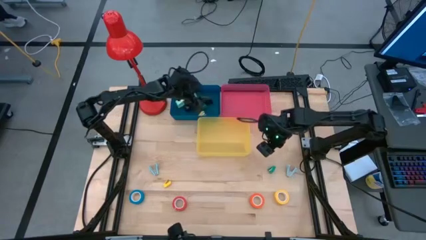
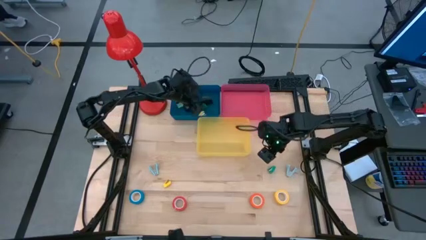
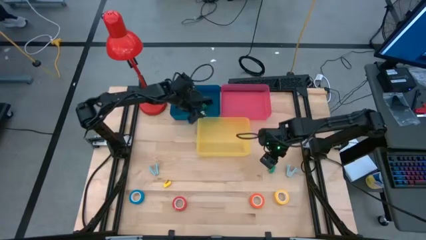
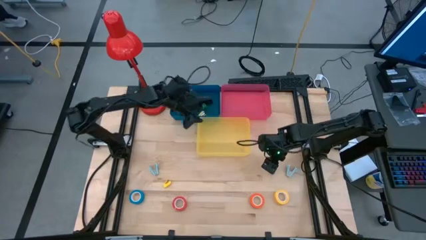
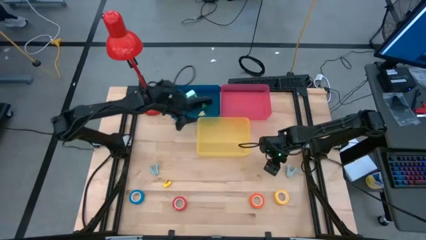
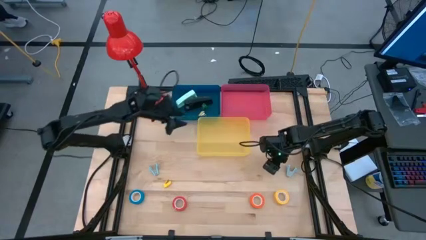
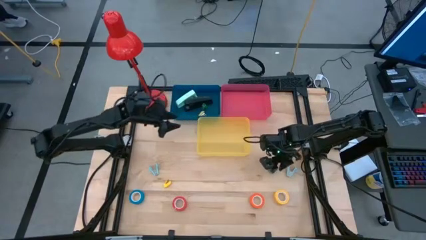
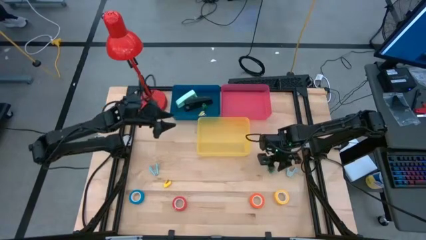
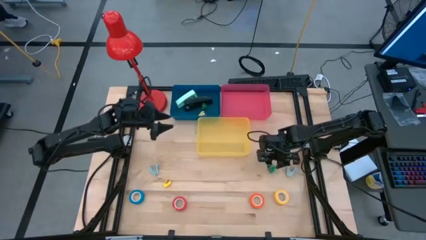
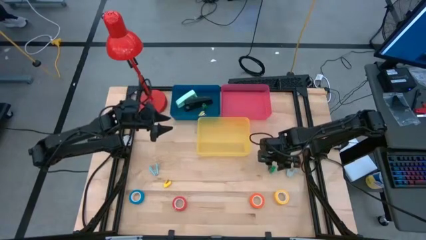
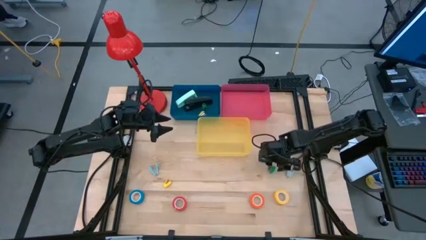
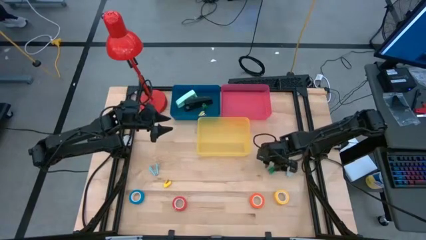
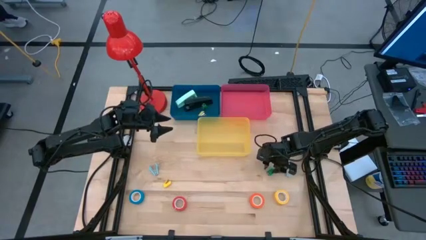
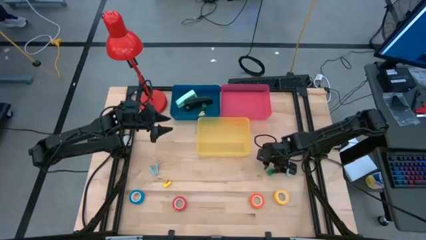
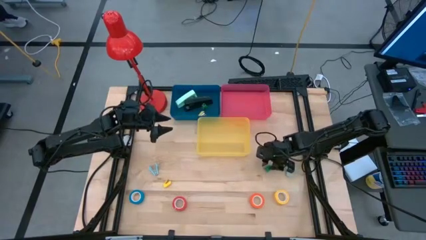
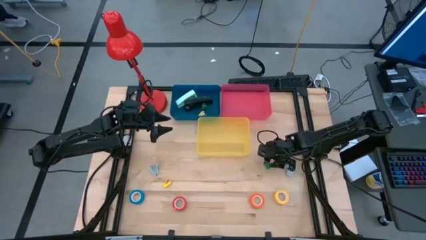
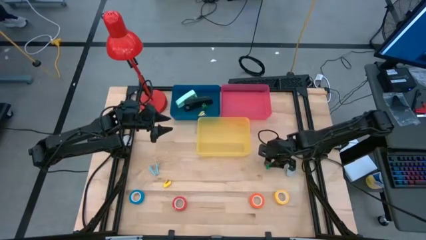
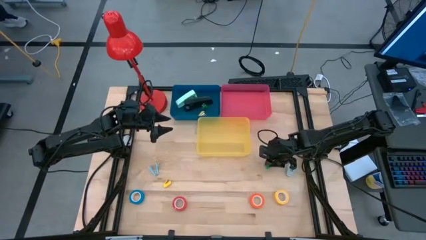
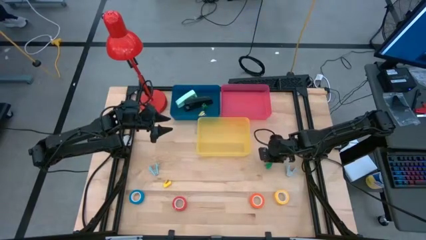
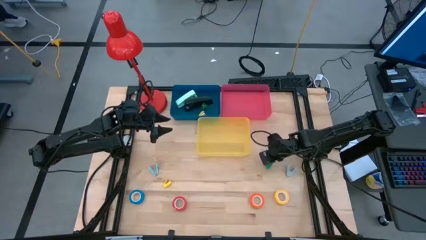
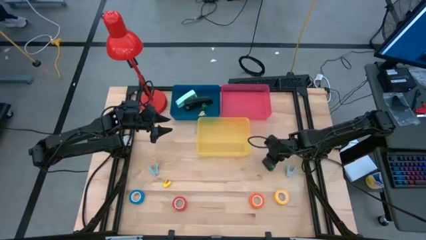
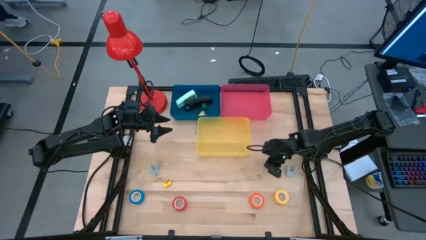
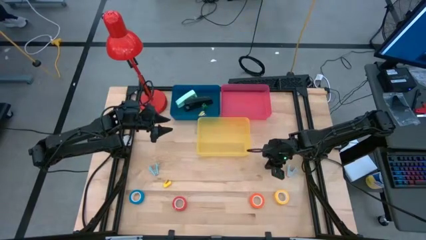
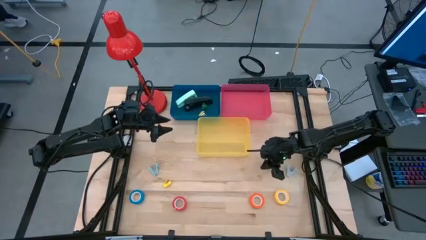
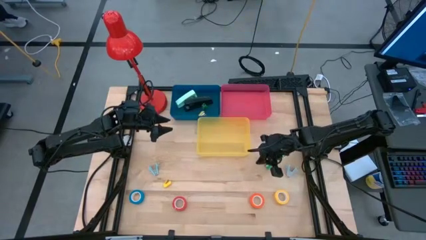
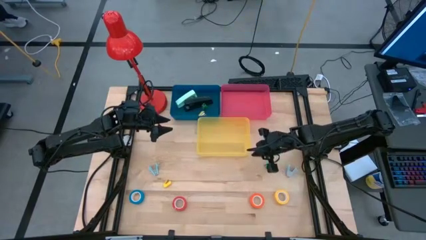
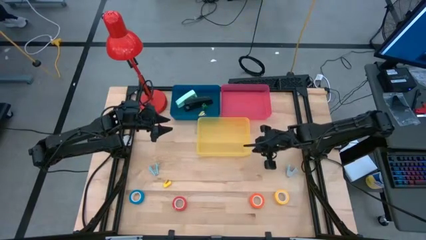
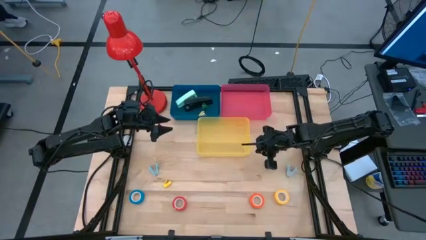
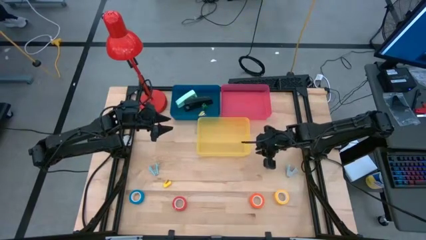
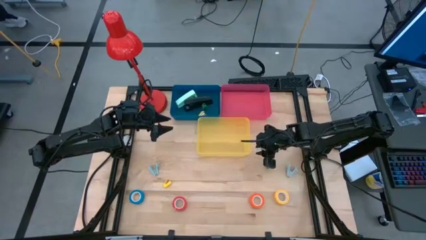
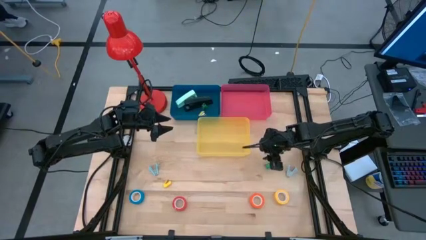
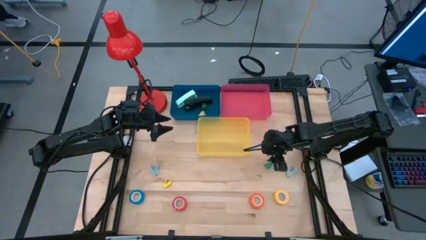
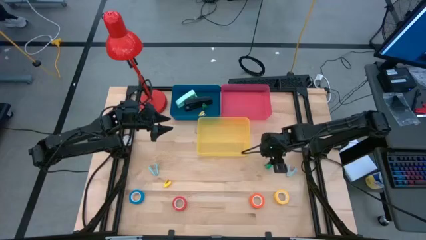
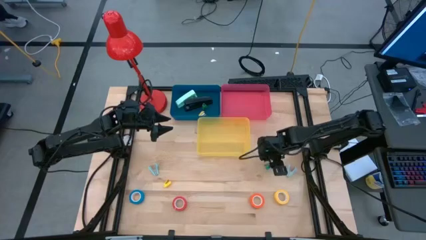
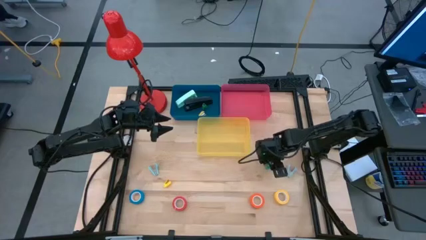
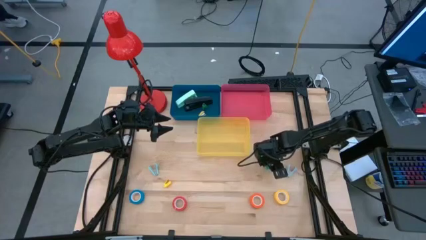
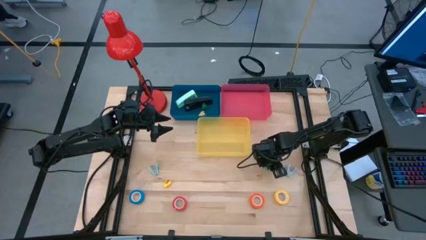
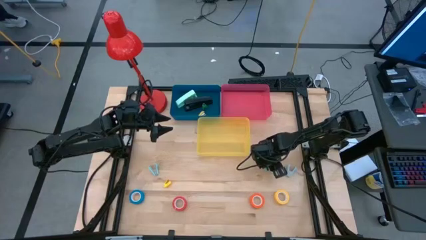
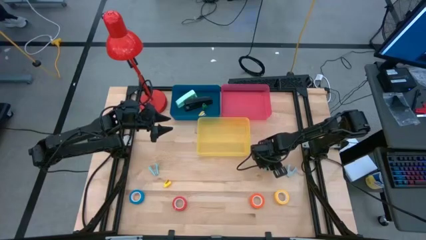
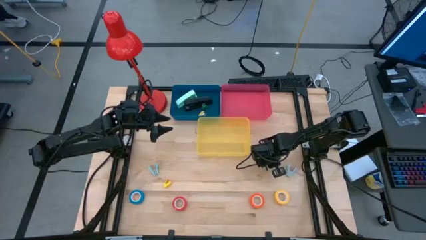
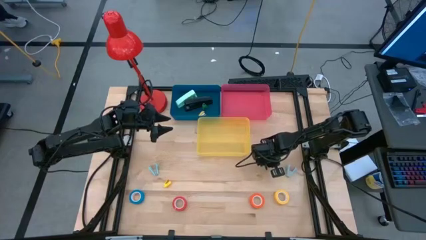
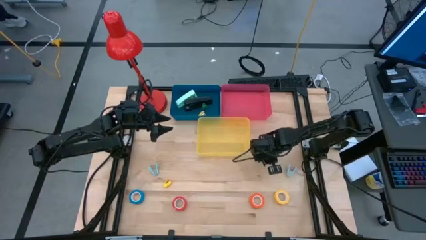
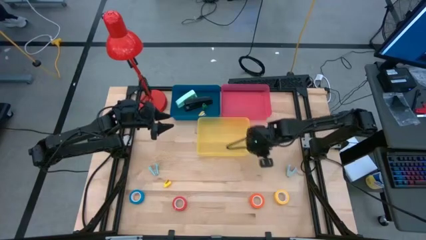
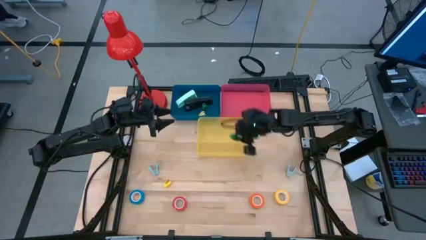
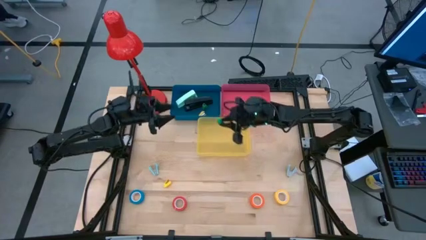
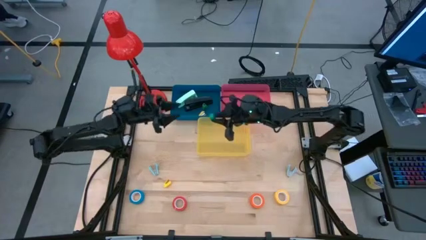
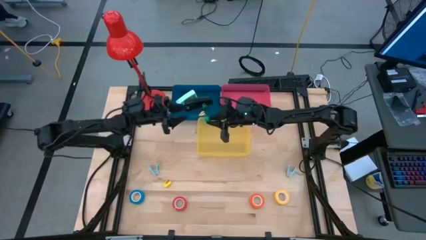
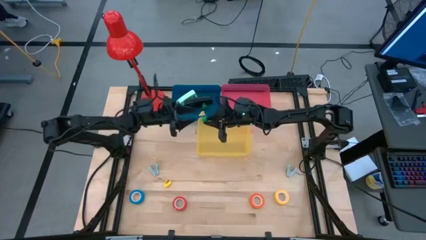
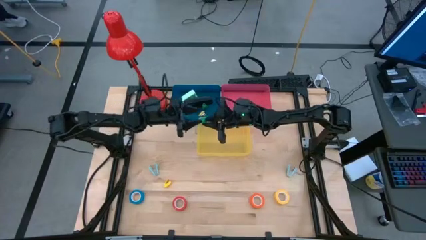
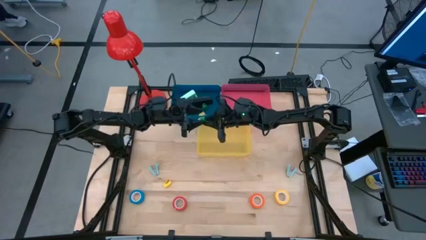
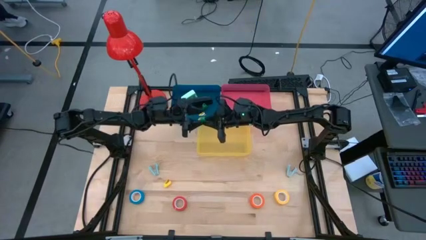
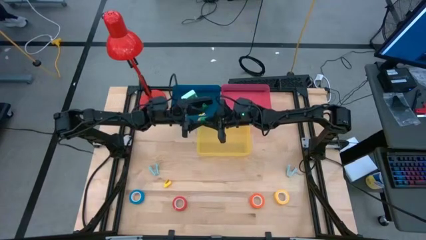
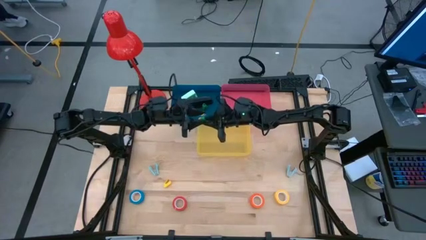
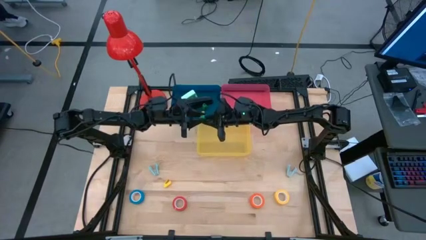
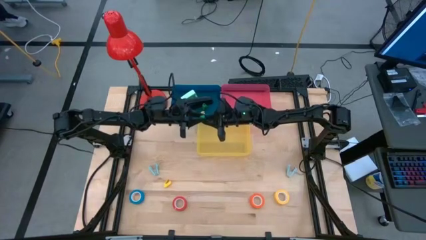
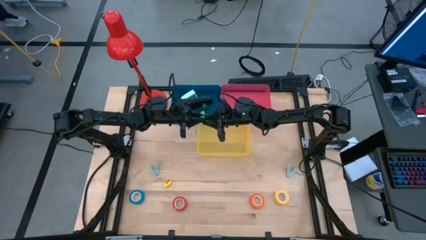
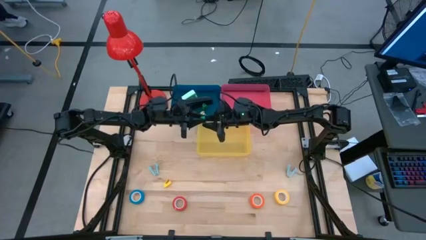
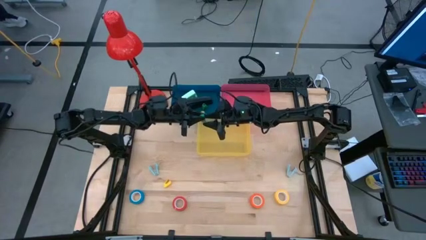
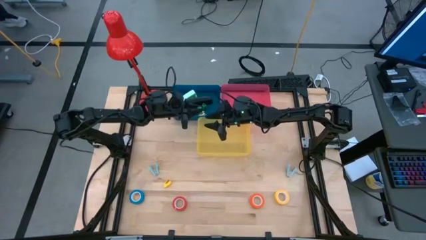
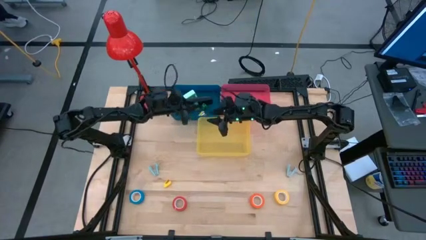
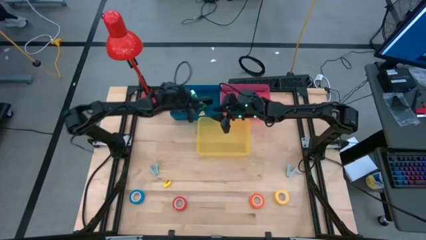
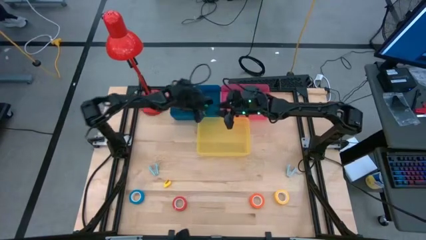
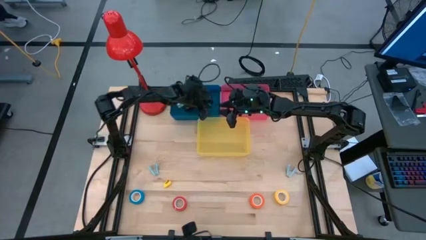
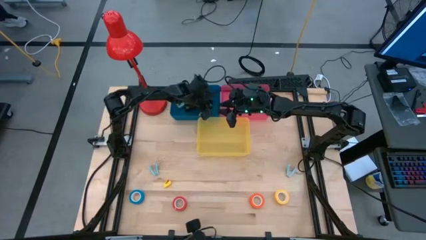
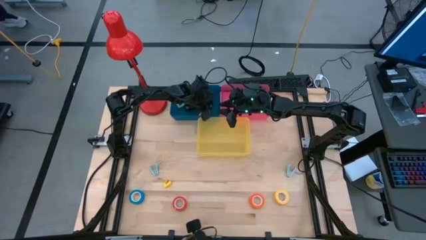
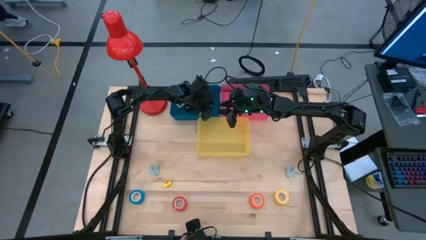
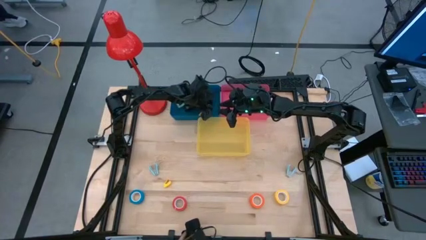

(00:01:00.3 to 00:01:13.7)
Task: Pick and place Stapler, Stapler remover, tape
Put the green stapler into the blue bin
